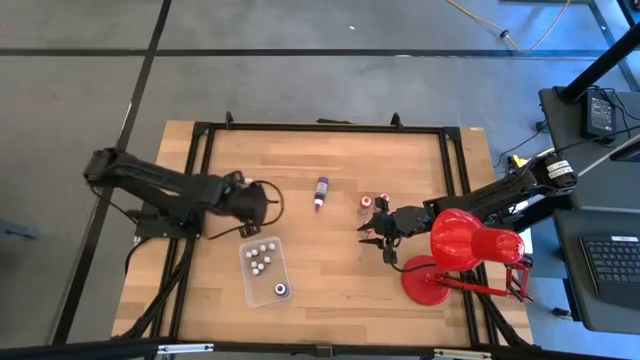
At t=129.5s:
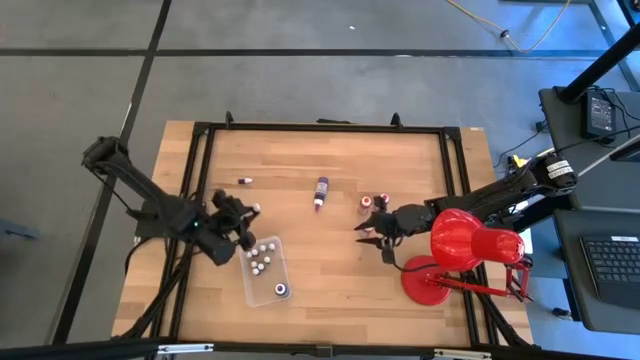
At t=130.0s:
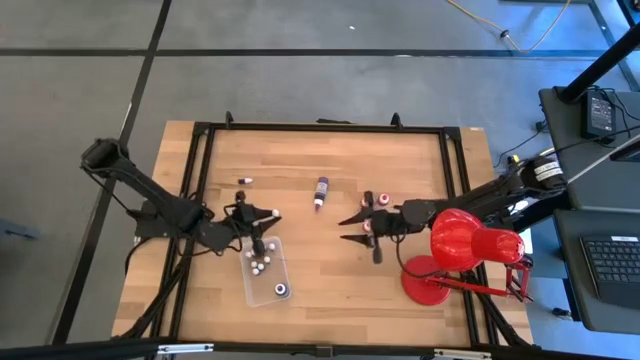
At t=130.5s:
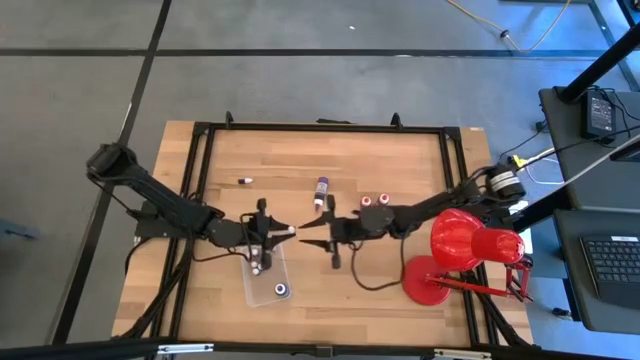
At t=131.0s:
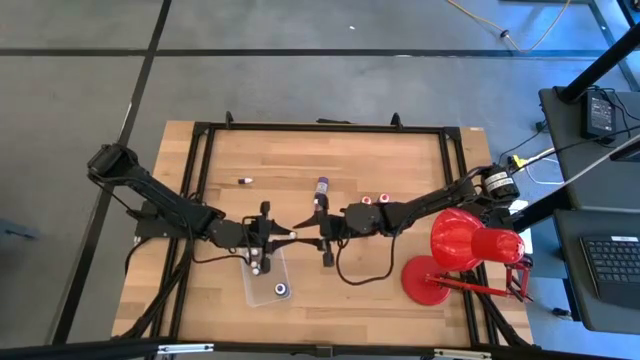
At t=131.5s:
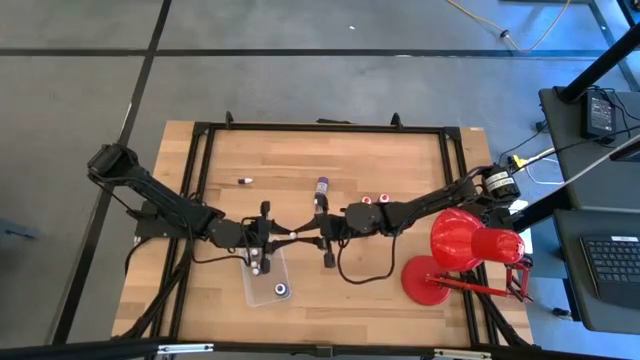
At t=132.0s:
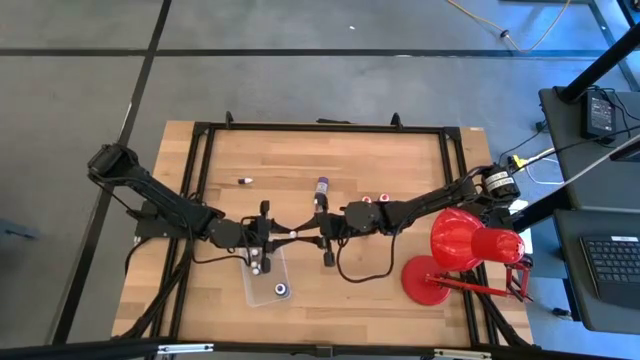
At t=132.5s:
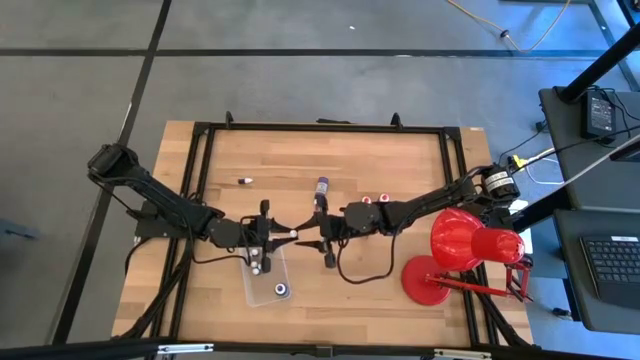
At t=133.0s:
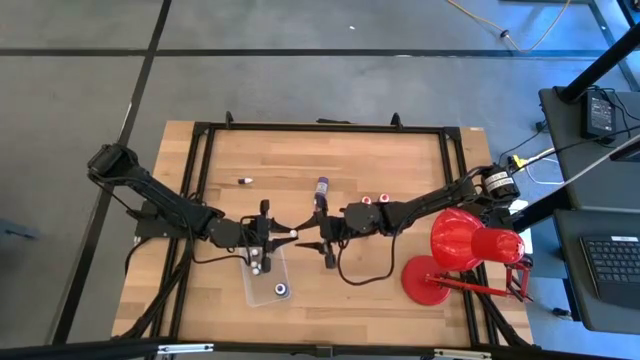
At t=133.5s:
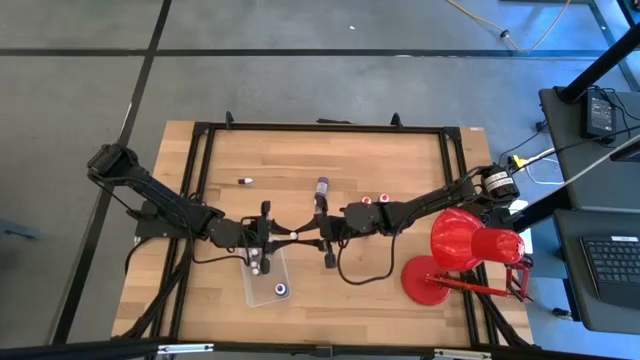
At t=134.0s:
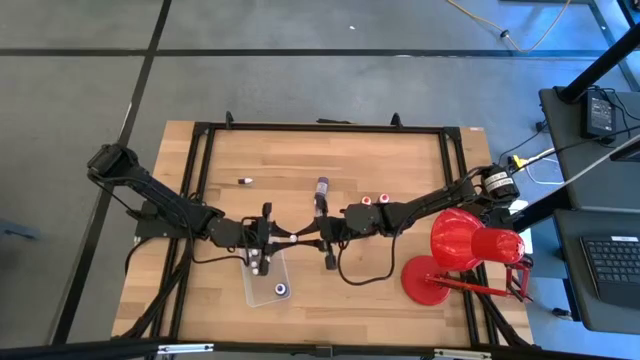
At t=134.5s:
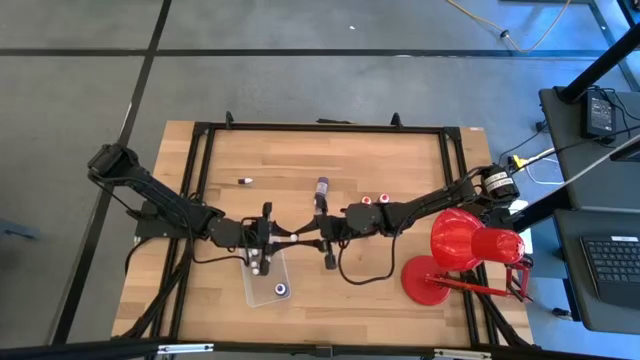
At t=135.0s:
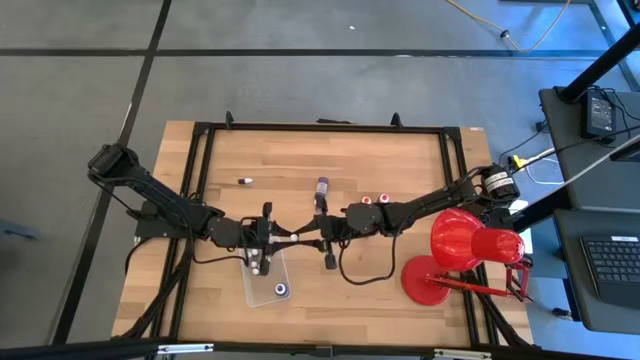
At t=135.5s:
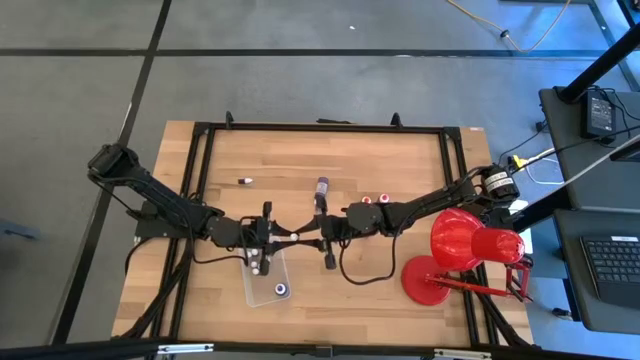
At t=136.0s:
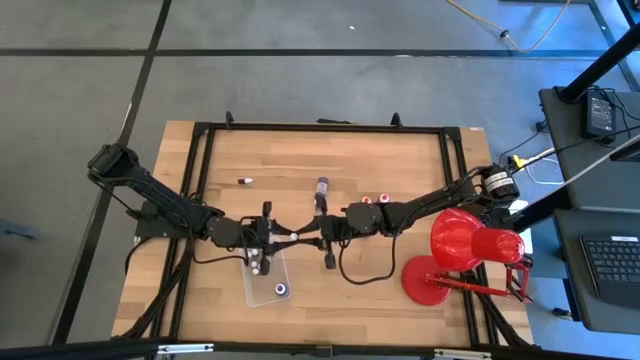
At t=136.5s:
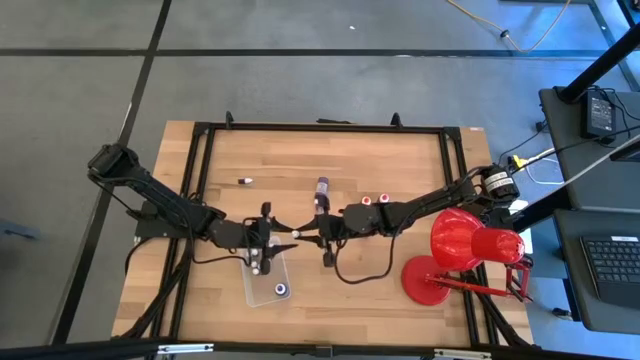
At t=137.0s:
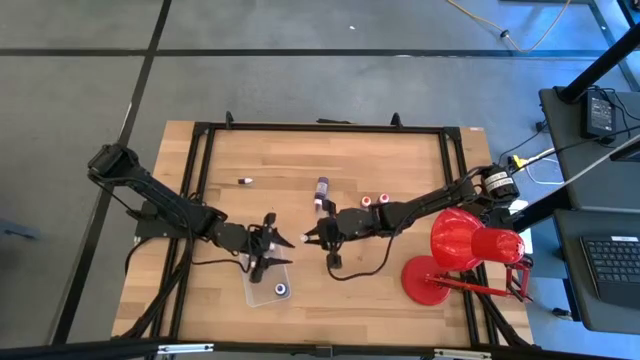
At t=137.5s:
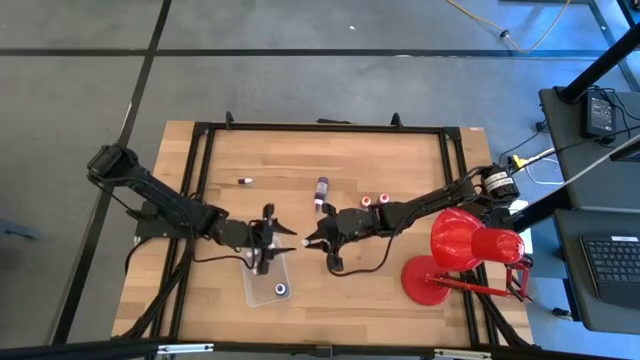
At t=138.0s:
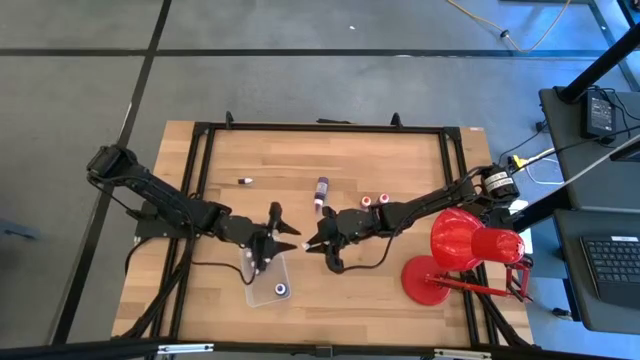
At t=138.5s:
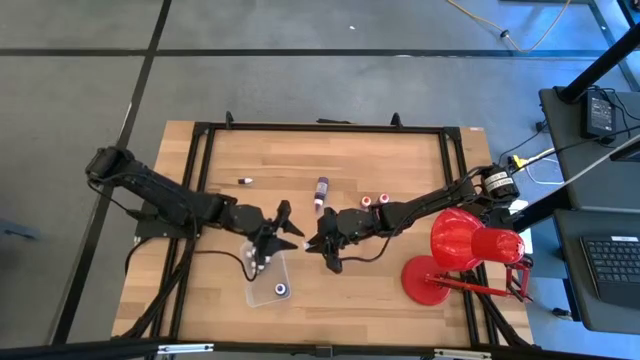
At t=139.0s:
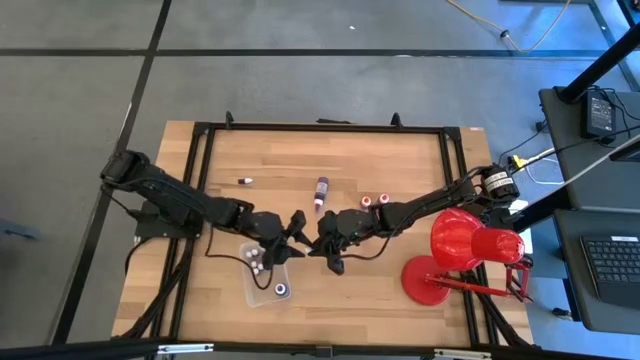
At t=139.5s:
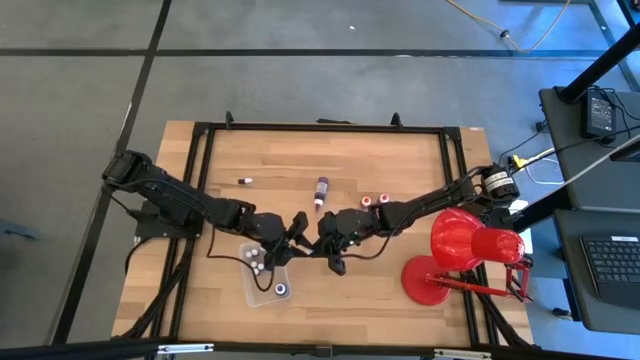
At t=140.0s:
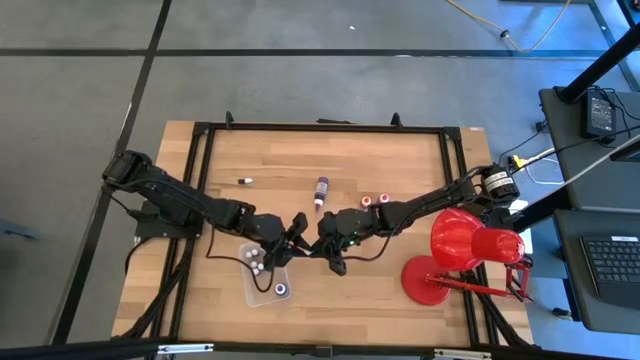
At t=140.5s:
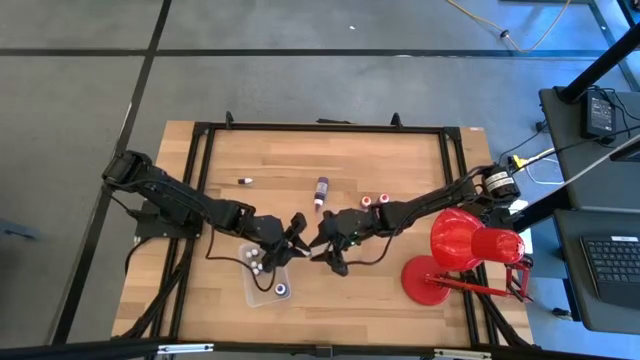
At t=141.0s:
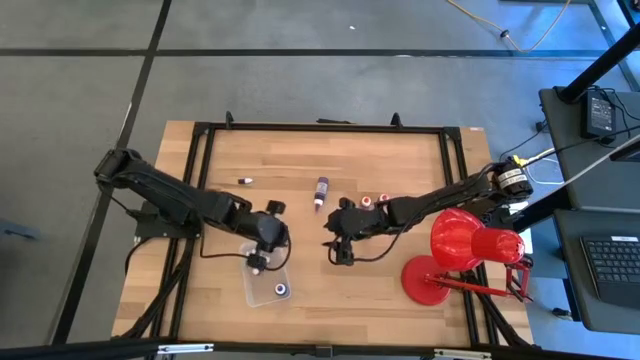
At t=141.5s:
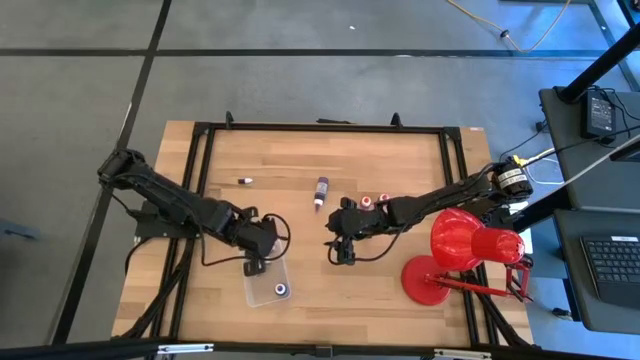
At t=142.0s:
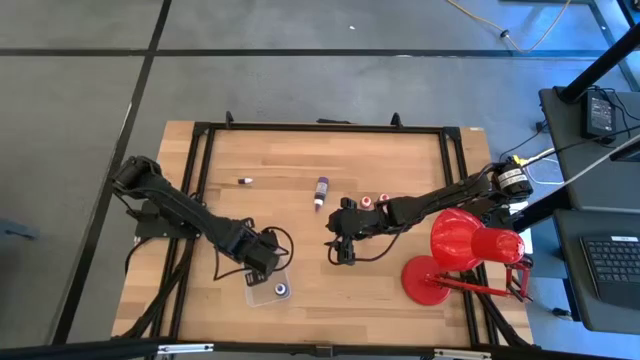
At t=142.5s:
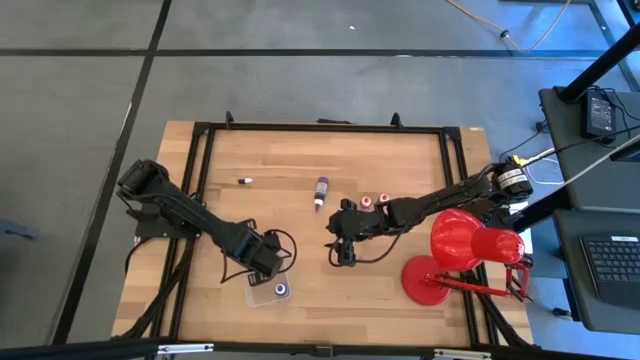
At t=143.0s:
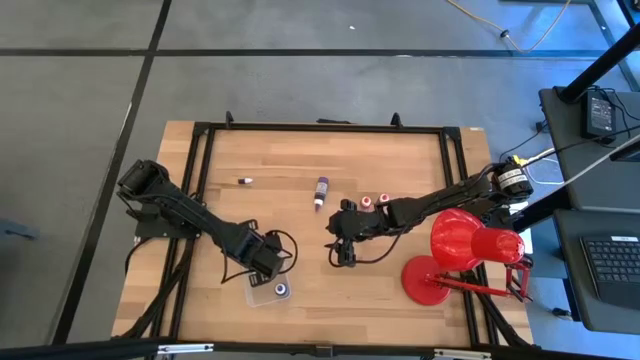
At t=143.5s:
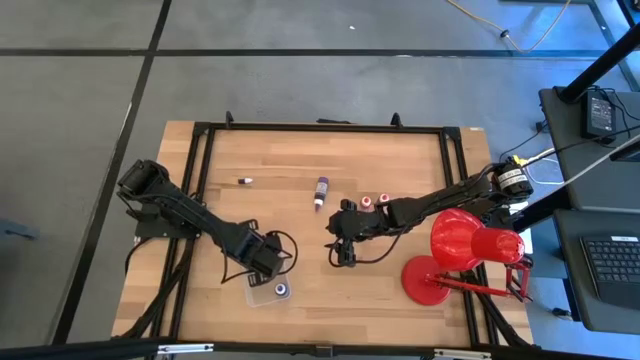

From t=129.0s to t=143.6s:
Task: Pick & Place food coloring
Put the small green food coloring bottle into the bin

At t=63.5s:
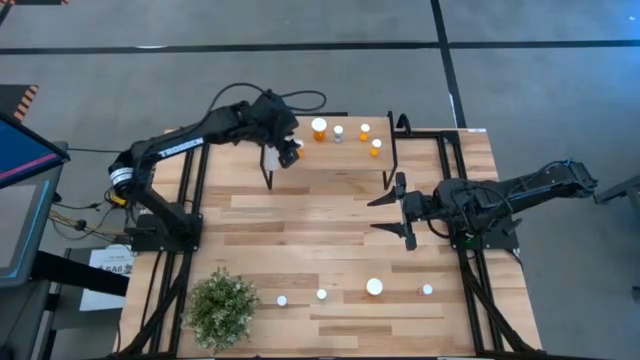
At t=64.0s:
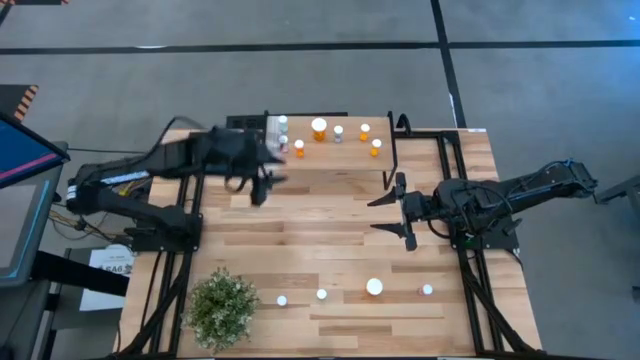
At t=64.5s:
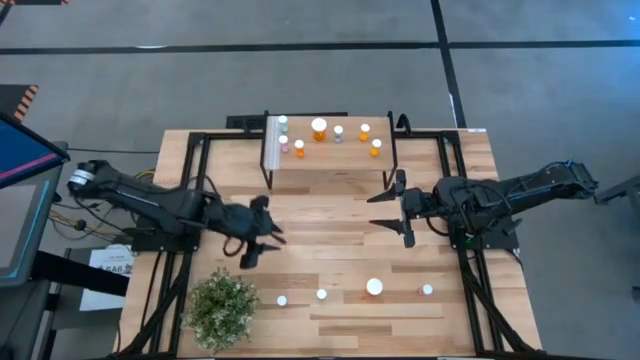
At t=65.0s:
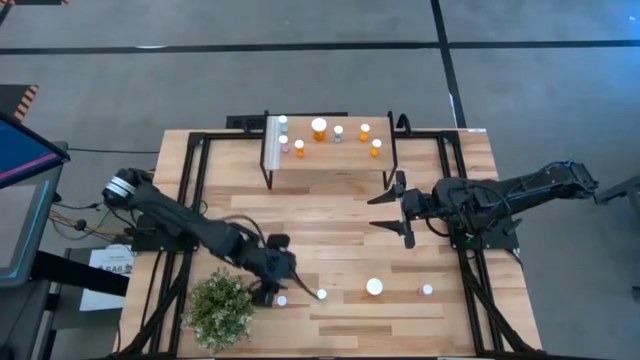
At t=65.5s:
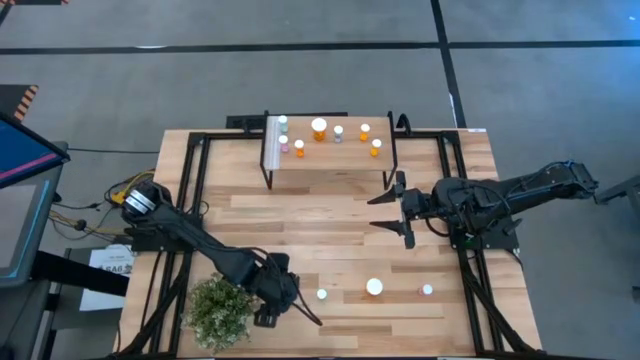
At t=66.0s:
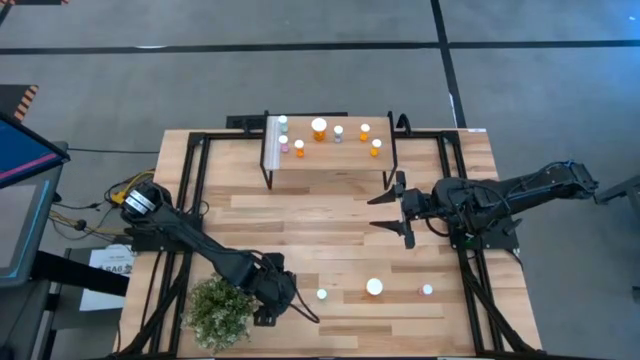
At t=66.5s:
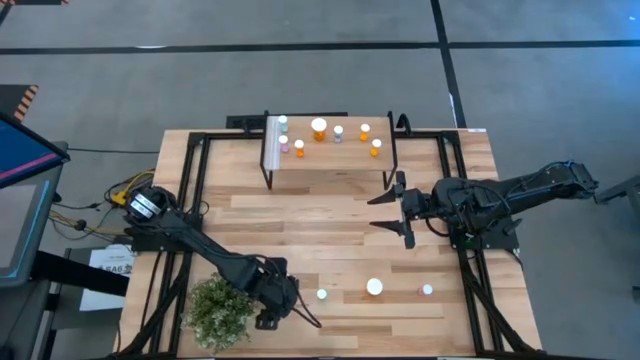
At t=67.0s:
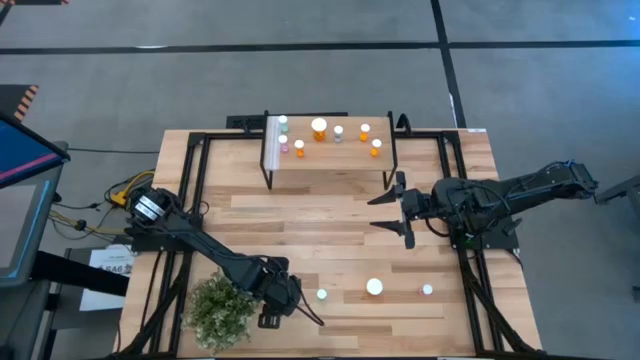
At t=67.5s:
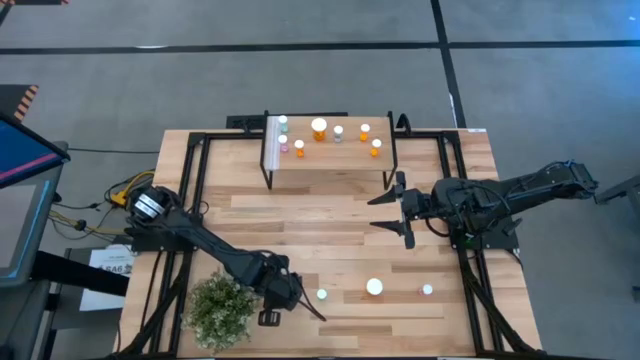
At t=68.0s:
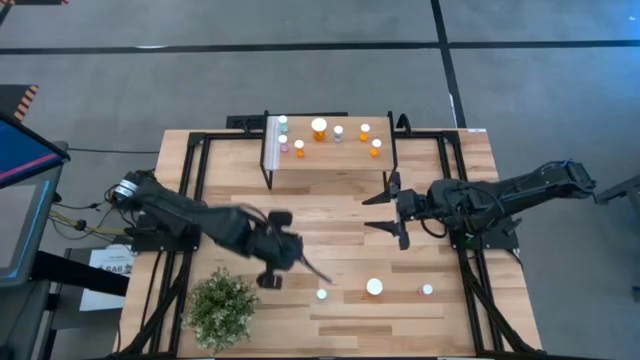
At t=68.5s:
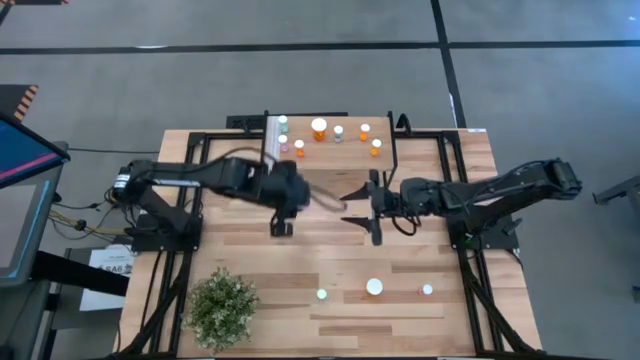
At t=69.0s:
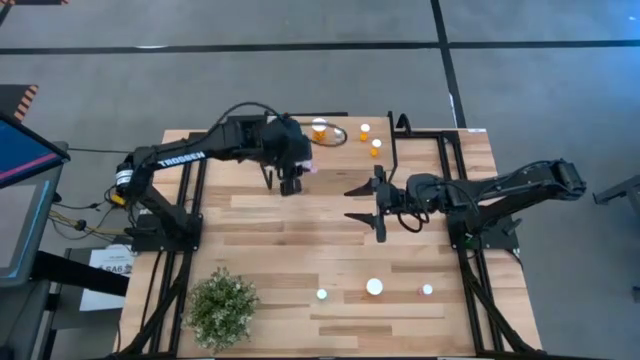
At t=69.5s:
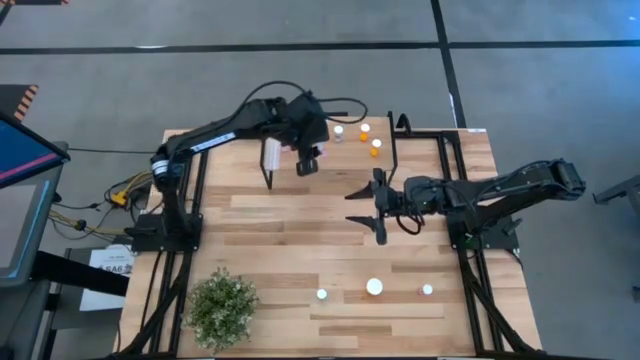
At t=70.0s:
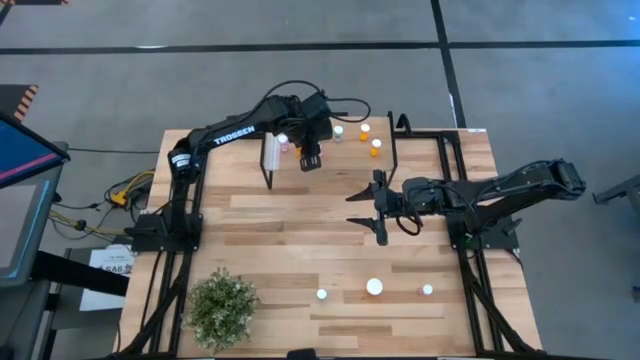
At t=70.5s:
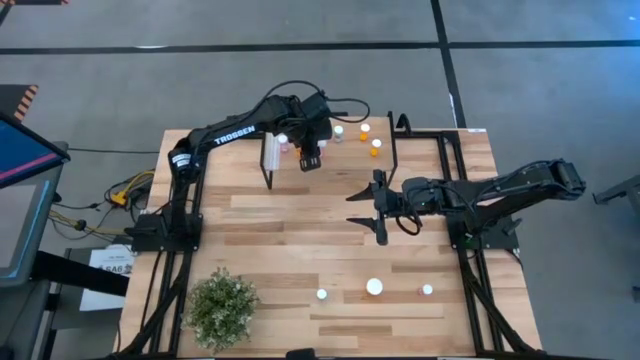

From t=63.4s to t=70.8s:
Task: Pick and place medicine bottles onto shelf by color
Put the pink pill bottle on the shelf
